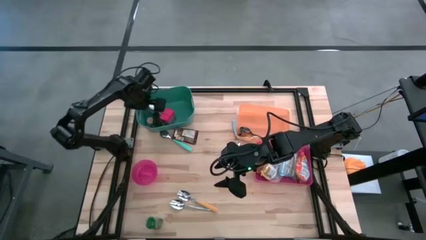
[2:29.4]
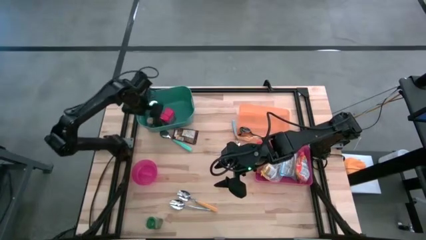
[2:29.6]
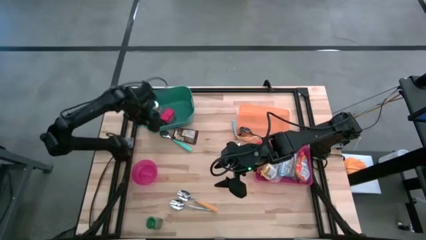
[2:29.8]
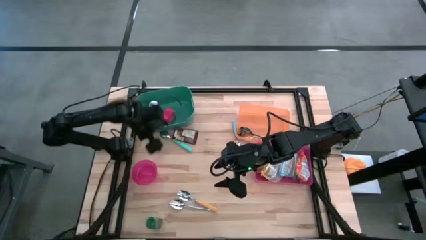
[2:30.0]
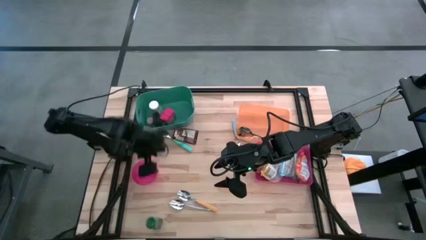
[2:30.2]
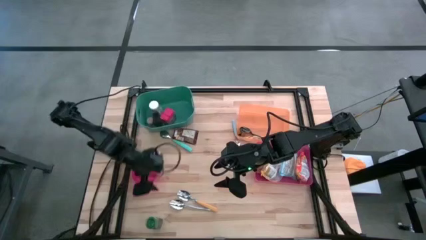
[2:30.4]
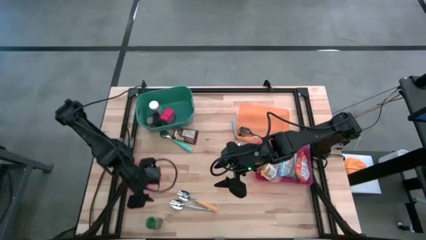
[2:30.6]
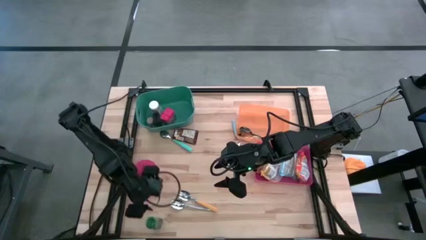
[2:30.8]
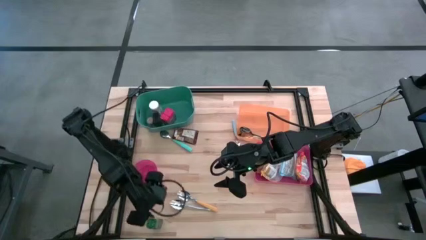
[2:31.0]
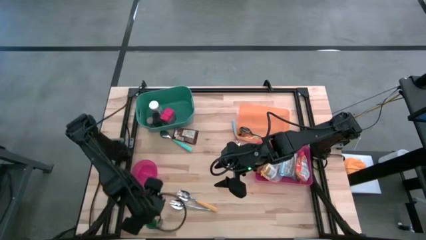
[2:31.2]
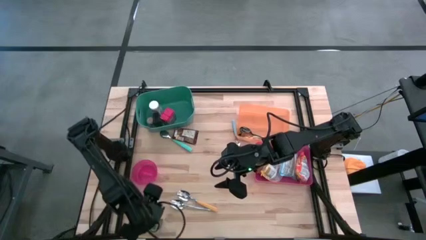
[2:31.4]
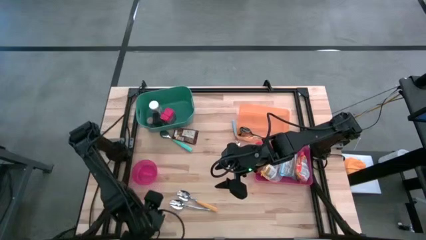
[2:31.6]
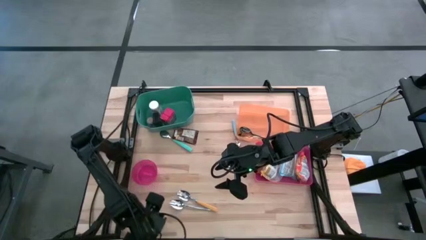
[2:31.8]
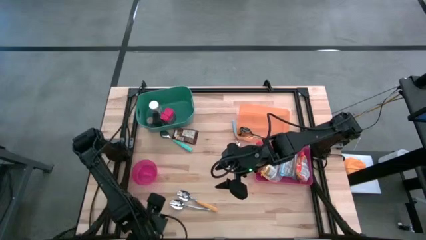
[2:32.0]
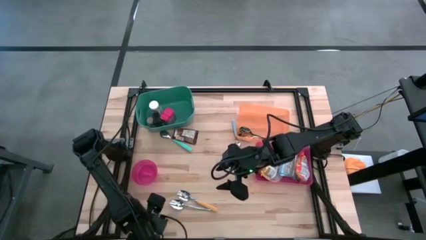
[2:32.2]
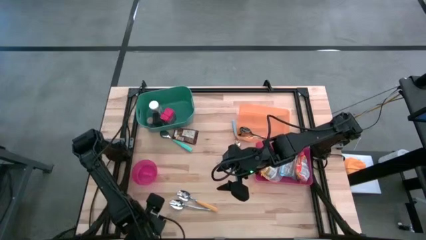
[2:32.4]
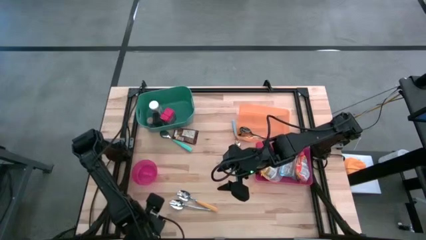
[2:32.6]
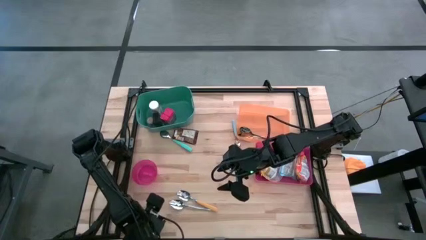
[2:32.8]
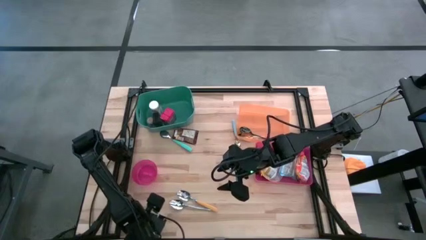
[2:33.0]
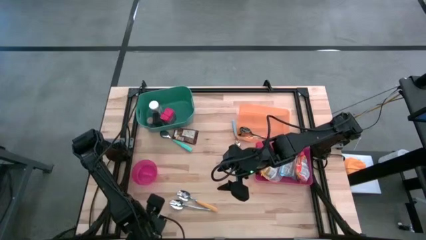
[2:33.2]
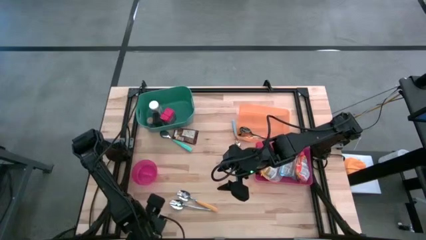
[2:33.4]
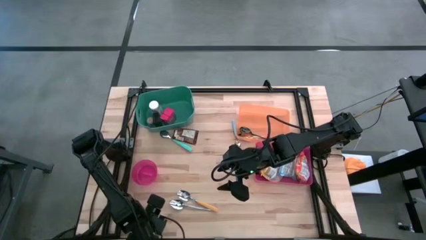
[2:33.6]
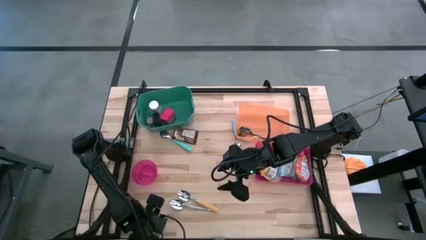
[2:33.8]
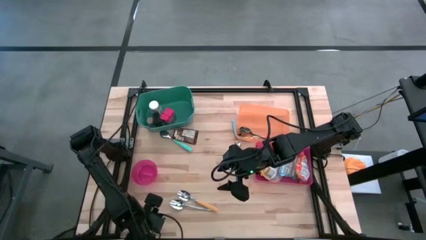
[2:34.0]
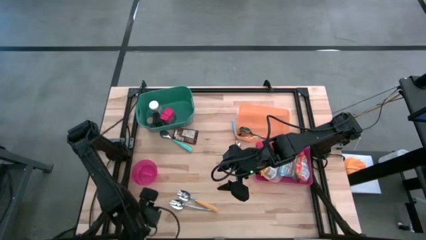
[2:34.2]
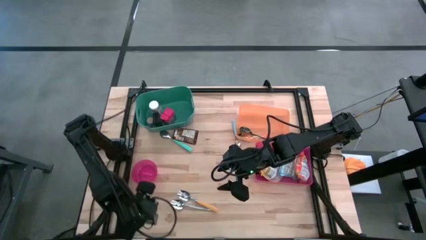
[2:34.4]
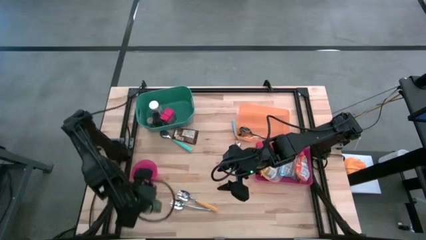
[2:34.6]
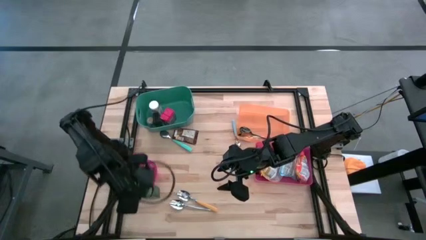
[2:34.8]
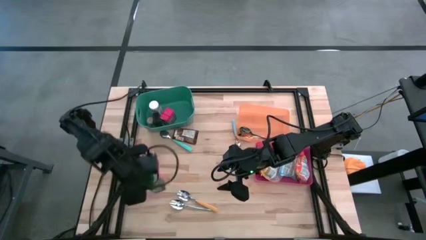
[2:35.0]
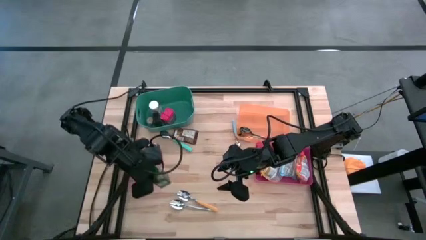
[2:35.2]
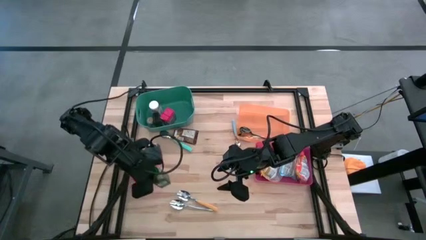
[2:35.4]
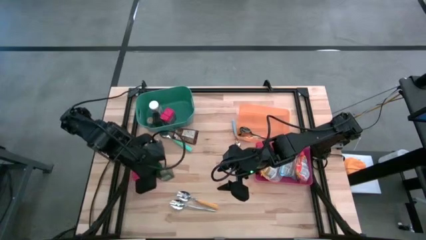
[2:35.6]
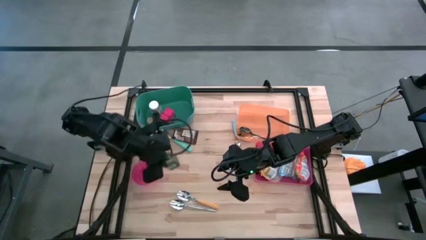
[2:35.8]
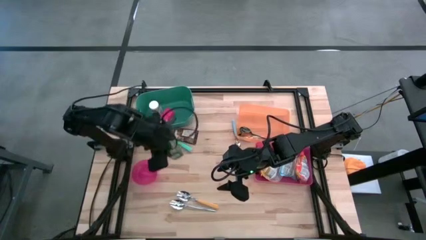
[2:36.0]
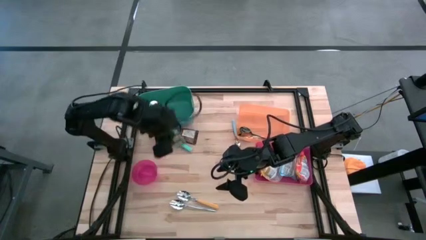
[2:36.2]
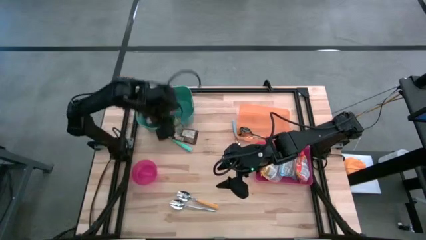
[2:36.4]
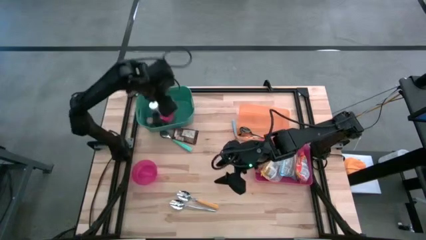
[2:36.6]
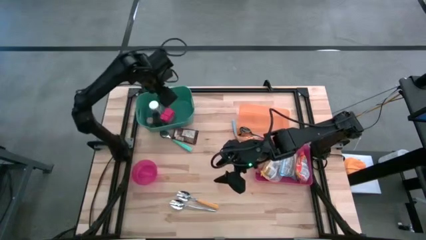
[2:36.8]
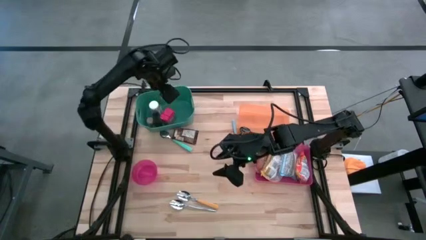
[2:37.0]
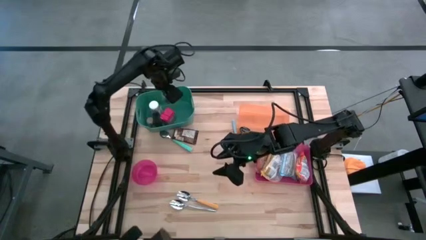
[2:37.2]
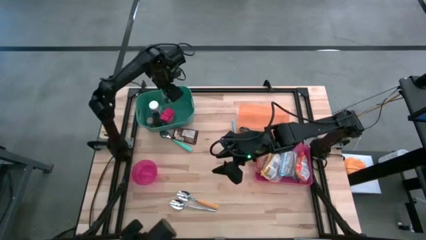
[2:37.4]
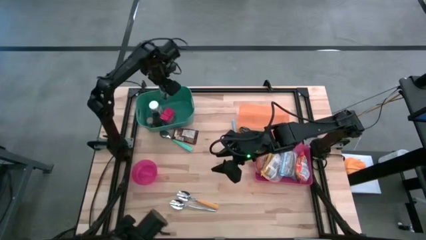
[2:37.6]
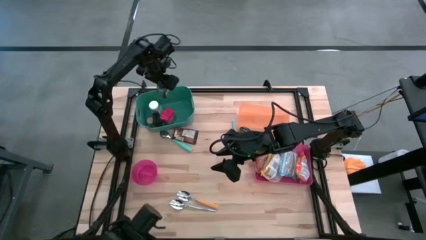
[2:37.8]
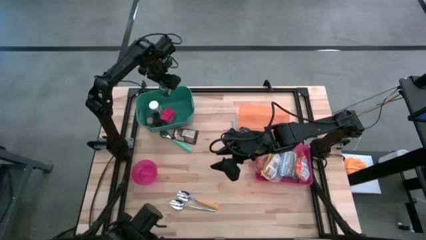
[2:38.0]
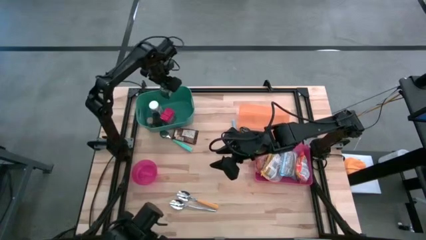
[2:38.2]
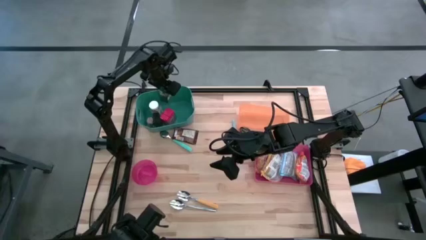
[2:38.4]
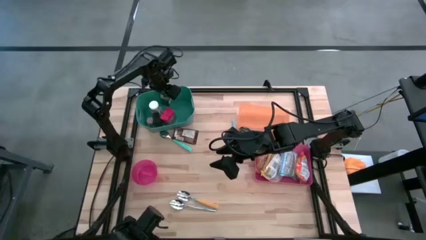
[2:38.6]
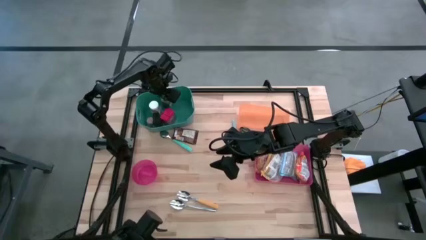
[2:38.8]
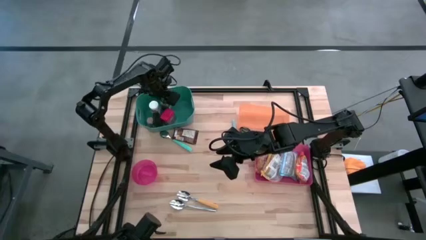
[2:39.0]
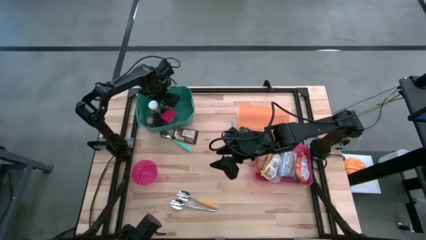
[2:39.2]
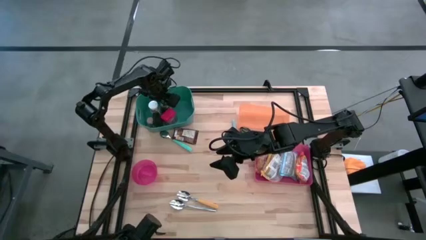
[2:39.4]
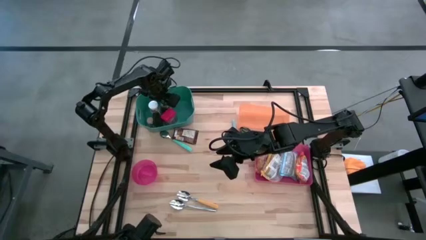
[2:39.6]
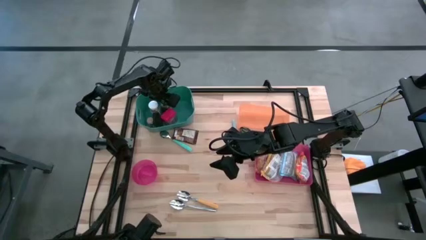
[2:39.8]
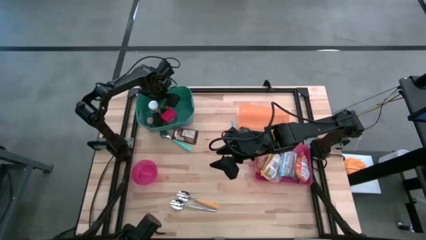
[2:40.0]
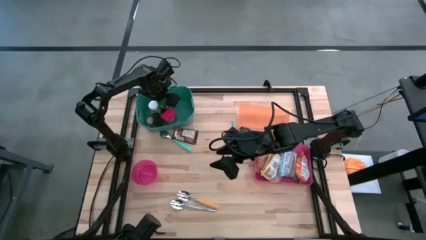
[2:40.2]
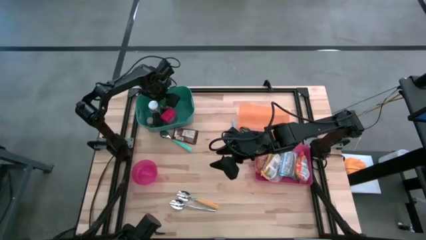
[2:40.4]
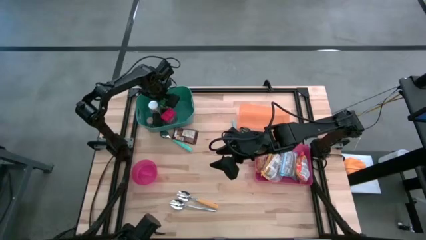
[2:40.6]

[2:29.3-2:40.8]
Put the green seasoning bottle into the green bin
